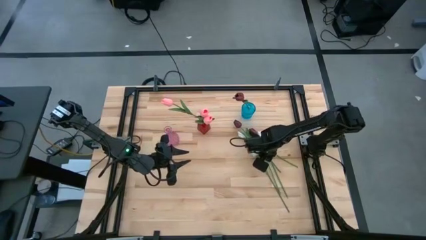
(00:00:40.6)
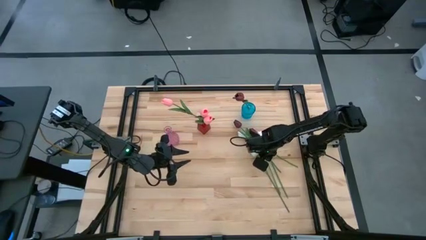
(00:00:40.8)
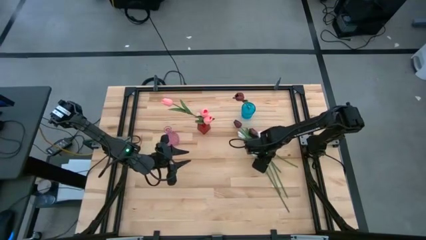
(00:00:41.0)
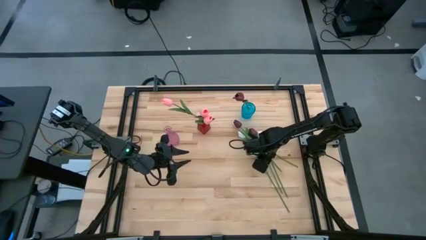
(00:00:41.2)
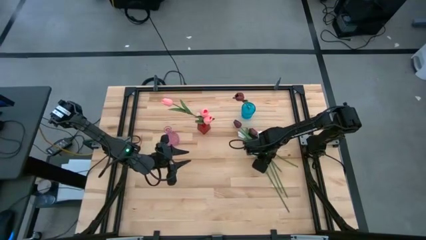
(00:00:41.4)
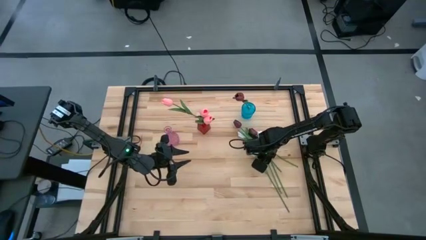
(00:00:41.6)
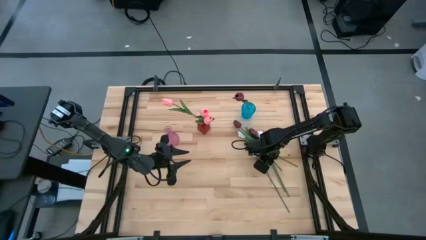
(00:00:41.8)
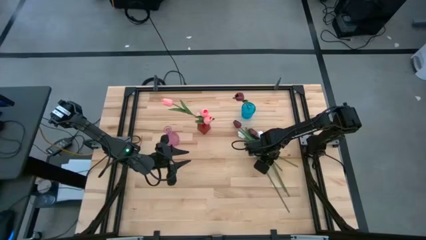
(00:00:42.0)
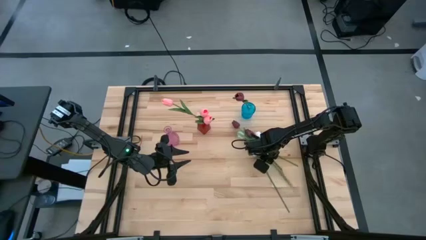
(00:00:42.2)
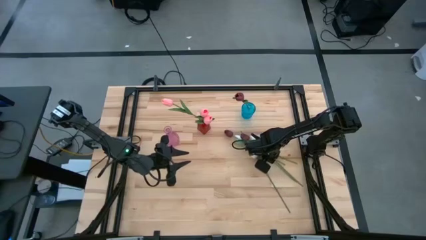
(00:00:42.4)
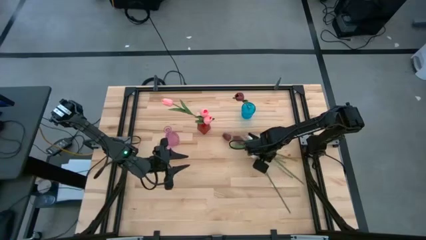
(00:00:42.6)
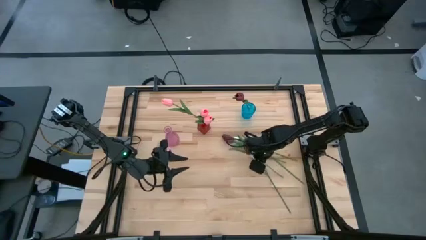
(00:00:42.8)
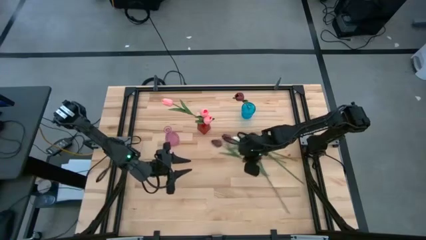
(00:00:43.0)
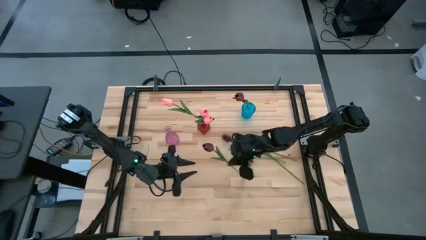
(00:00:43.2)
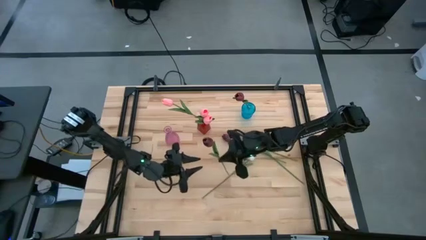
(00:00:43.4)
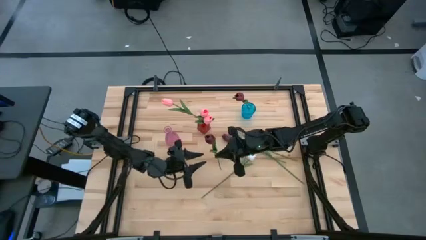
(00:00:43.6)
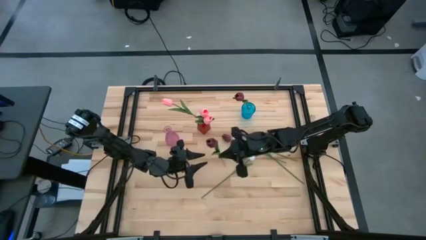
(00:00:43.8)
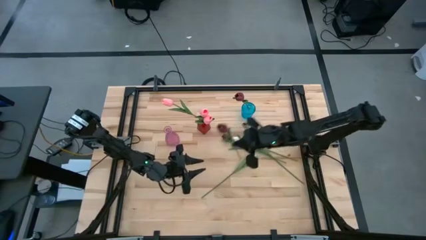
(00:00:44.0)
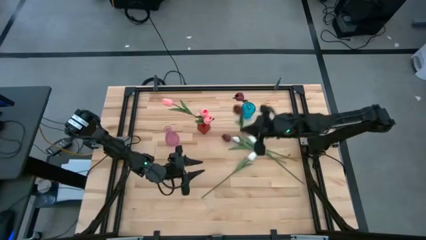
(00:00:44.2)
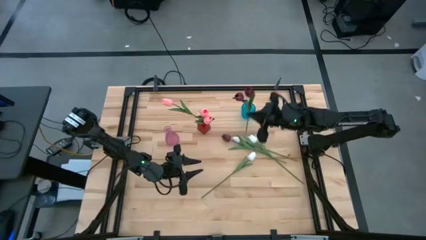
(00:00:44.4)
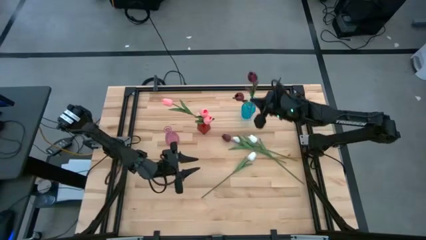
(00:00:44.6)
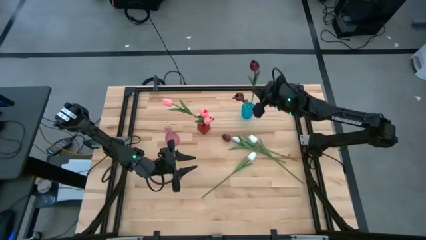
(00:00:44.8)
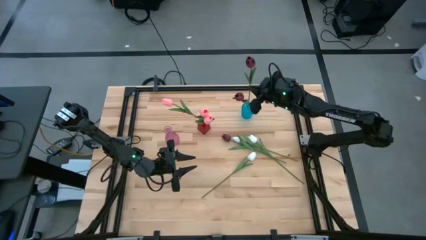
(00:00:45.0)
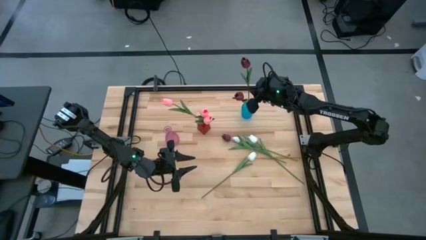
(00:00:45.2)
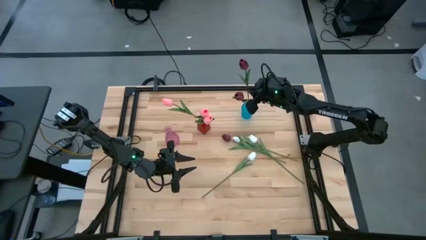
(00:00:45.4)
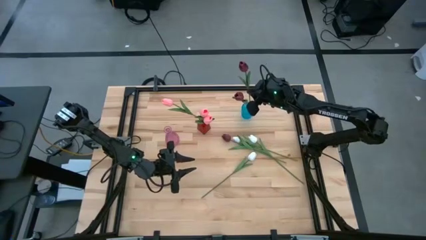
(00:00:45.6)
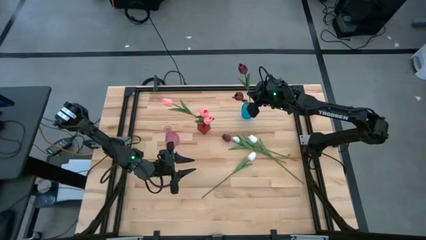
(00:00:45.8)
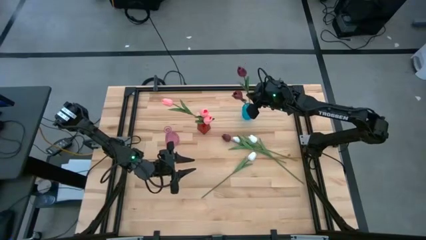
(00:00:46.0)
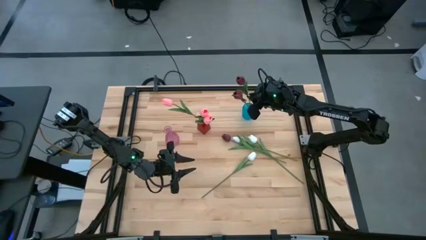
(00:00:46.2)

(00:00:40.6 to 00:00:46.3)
Task: Sort flowers into vase by color
Put the right red tulip into the blue vase

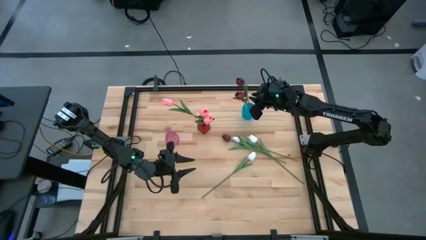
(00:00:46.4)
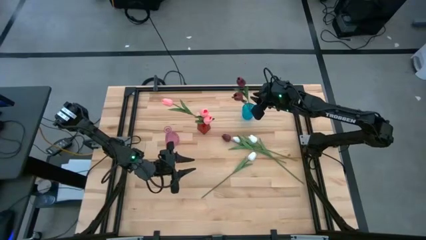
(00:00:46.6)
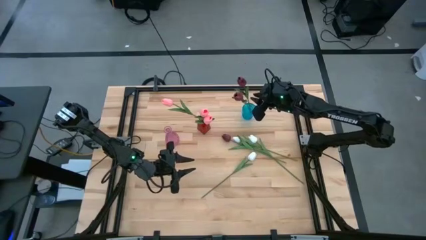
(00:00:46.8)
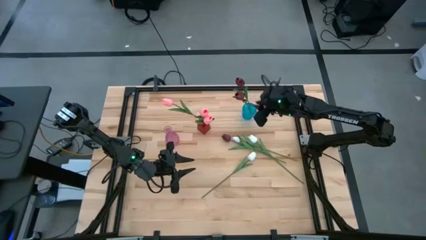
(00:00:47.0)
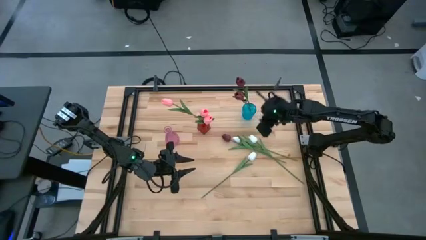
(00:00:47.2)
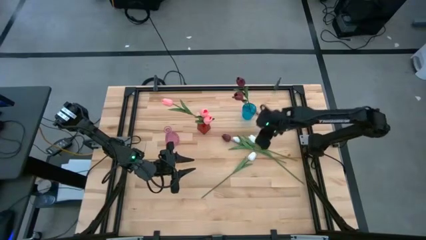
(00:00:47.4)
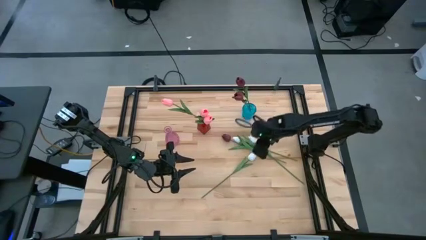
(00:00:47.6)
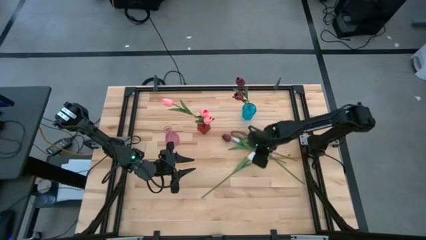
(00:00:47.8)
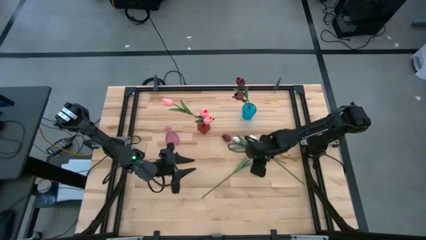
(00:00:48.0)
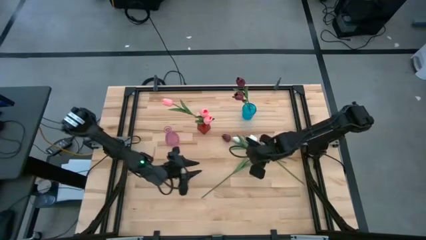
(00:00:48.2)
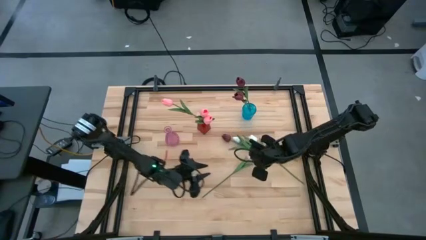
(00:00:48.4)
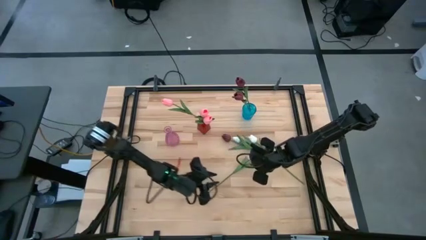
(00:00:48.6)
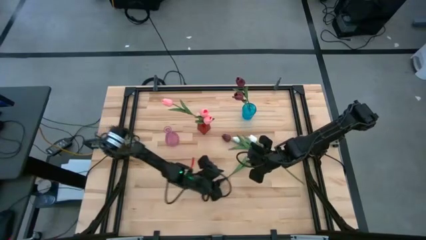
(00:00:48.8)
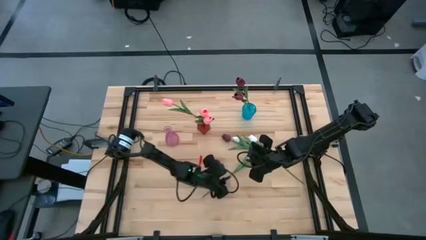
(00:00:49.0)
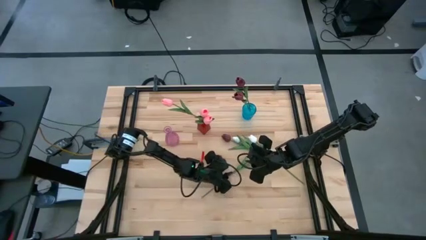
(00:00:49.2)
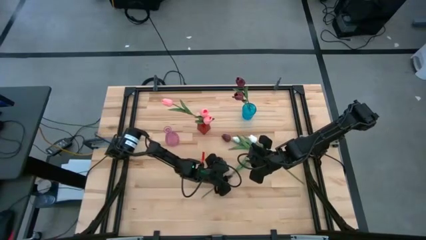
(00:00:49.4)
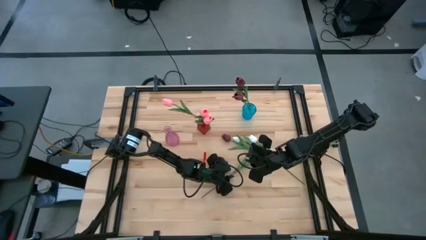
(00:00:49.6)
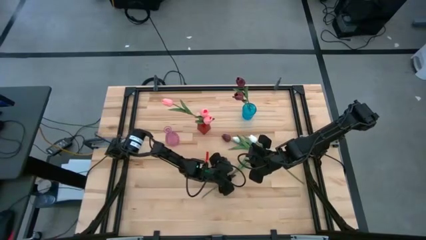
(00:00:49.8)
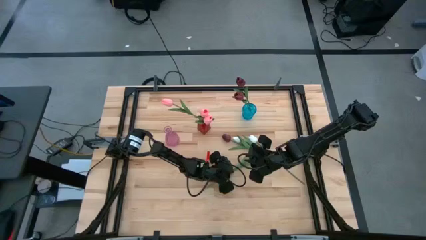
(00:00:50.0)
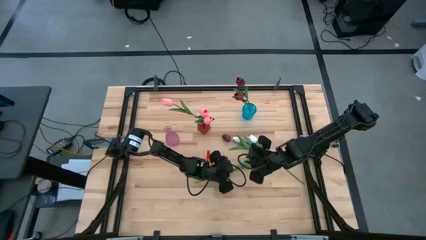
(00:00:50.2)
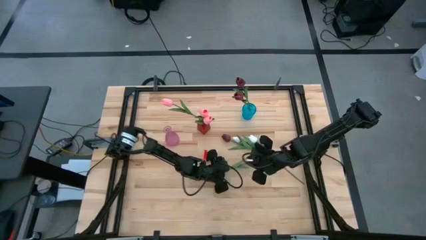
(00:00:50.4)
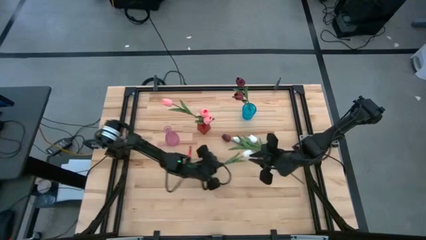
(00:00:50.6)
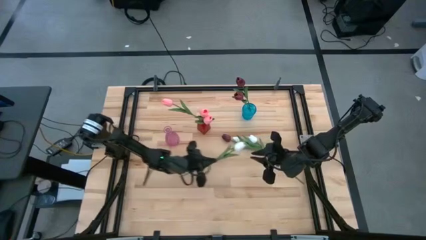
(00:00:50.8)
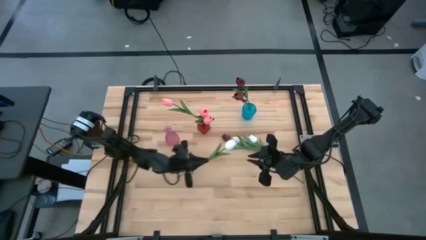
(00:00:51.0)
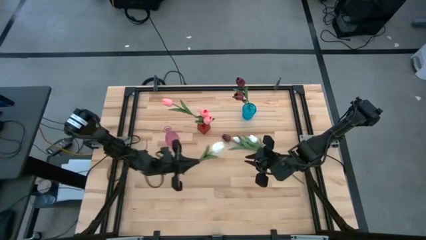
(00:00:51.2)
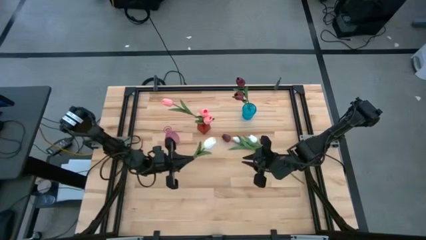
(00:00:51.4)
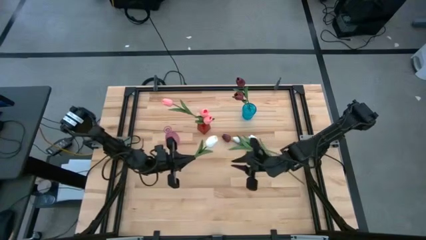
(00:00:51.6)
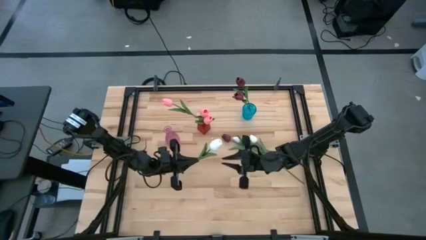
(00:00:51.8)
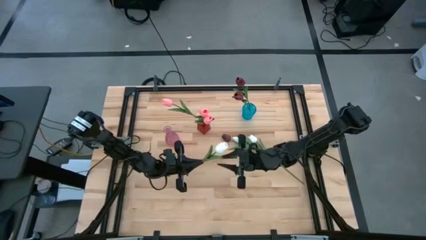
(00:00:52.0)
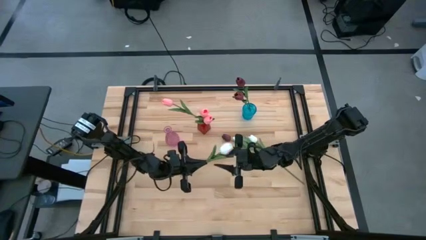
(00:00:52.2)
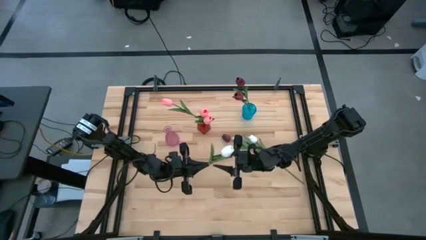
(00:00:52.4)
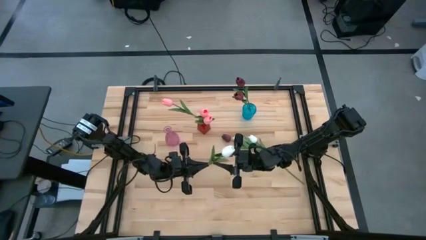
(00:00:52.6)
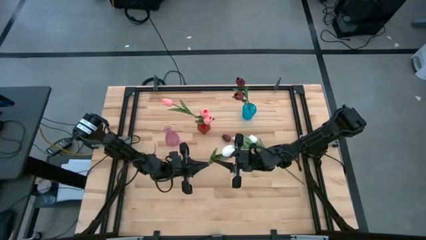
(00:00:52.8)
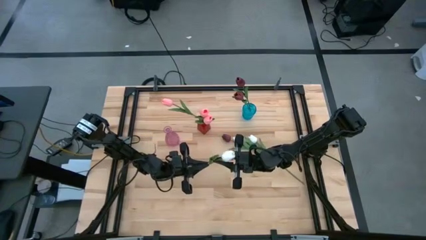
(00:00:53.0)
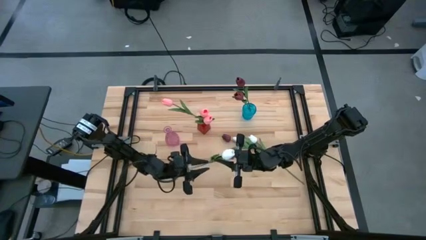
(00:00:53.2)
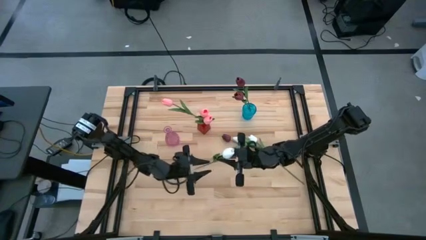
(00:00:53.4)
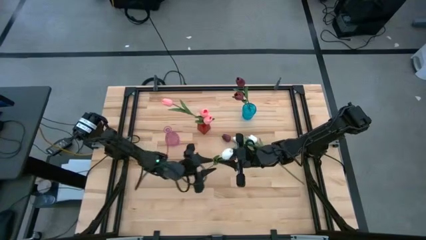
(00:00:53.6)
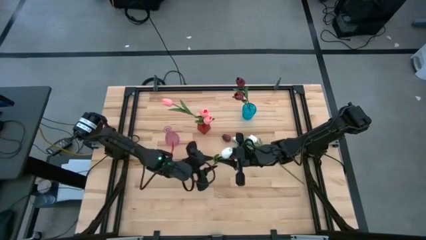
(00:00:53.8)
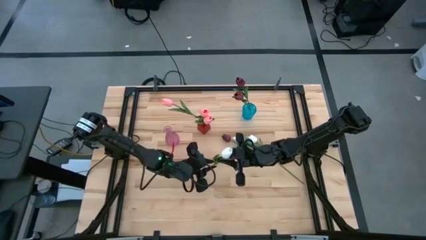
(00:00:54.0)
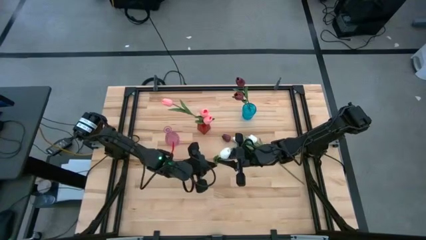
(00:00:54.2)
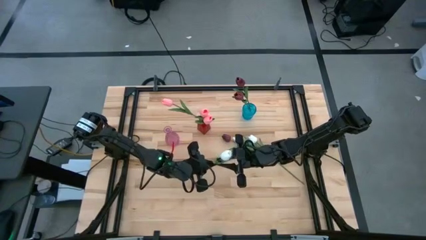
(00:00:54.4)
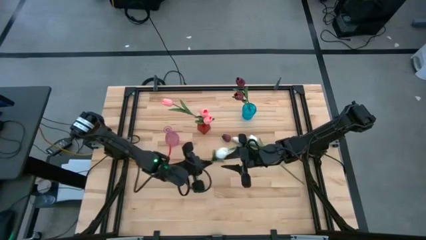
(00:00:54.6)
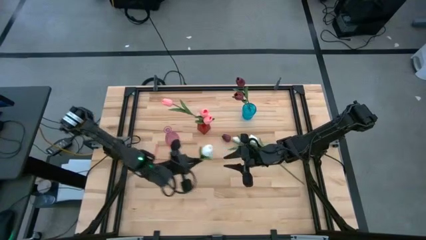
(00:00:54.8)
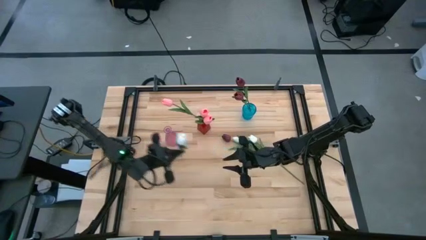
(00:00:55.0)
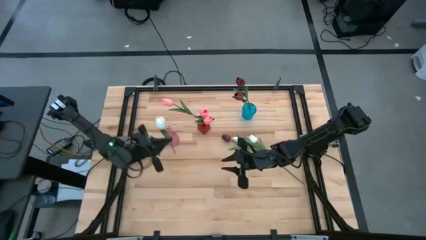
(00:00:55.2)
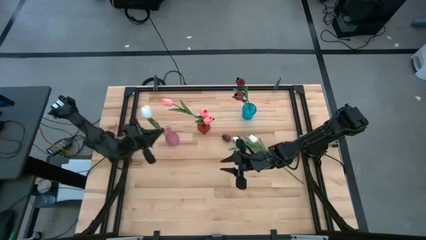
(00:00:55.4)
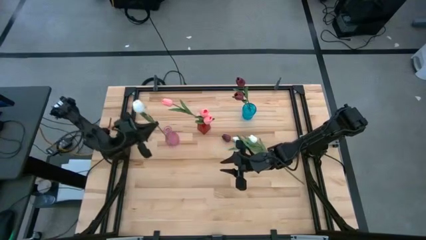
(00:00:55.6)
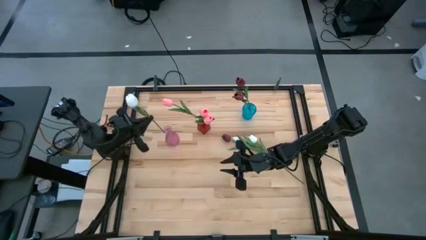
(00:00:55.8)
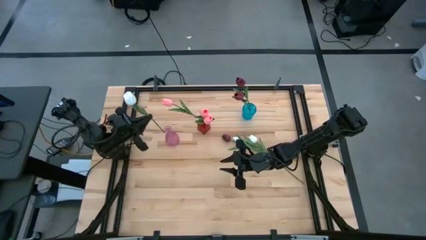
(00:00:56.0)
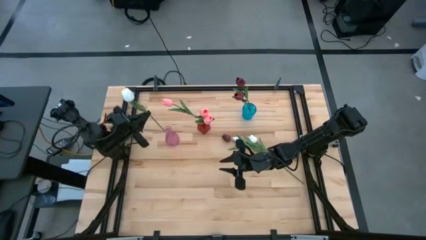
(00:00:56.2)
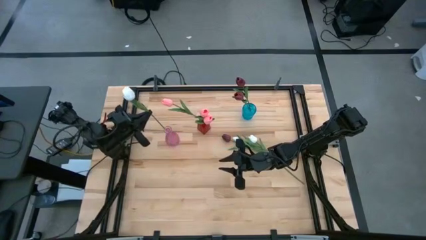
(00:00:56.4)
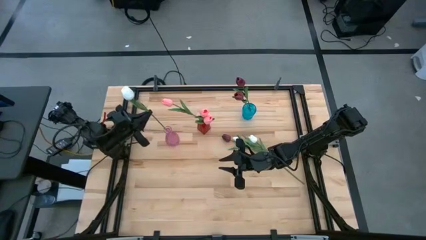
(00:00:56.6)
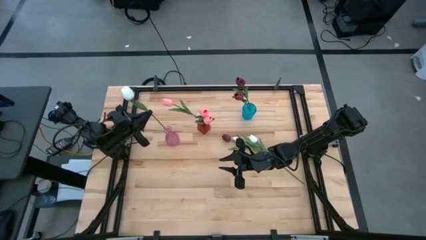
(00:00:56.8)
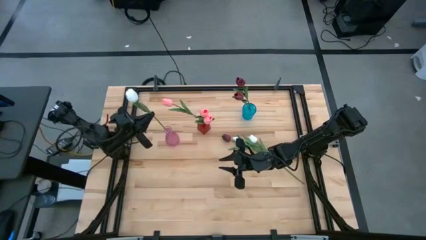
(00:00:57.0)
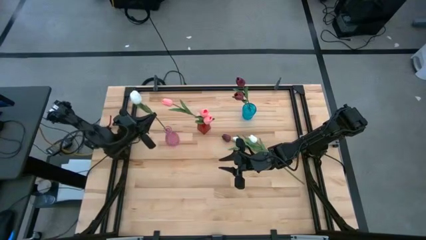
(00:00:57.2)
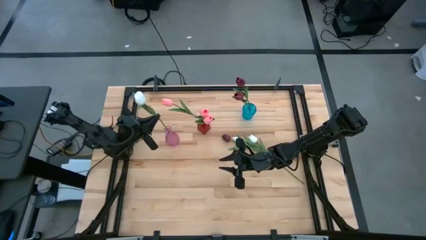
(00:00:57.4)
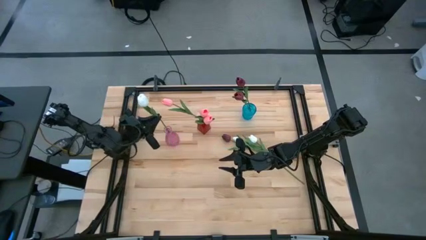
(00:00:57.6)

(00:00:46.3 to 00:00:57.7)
Put the bottom white tulip into the pink vase
